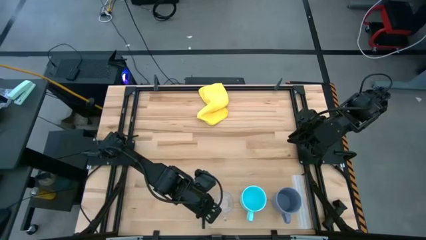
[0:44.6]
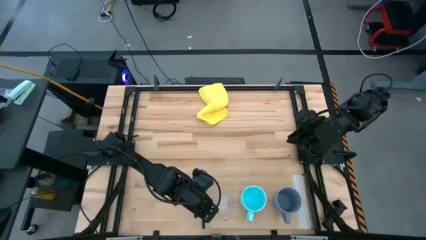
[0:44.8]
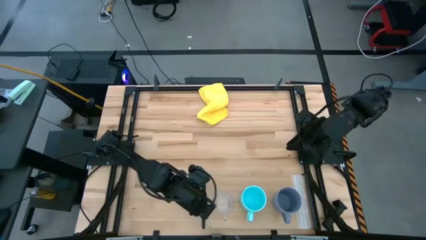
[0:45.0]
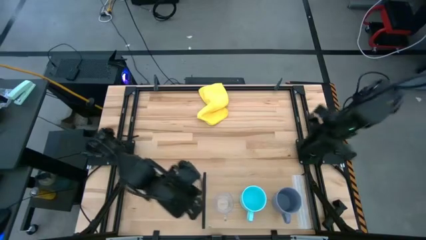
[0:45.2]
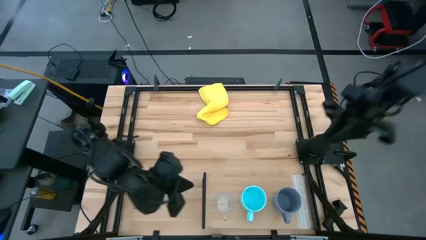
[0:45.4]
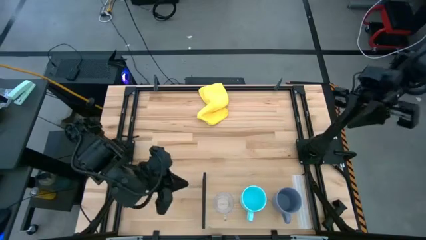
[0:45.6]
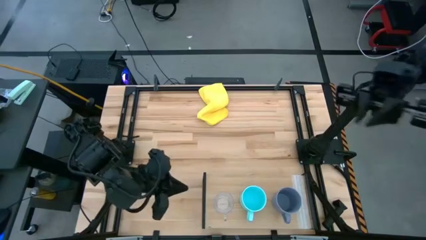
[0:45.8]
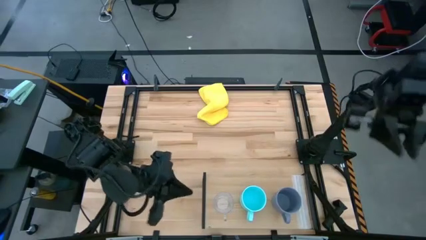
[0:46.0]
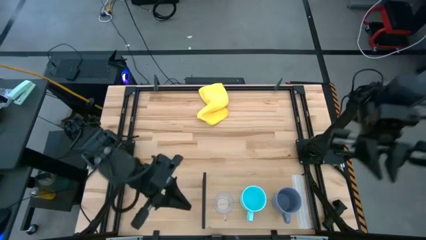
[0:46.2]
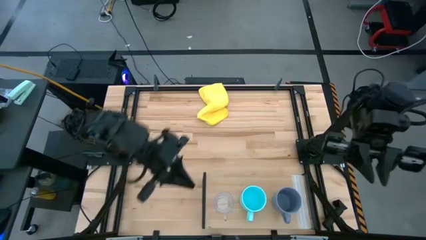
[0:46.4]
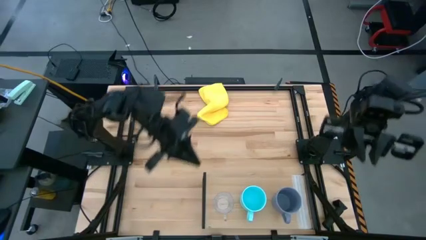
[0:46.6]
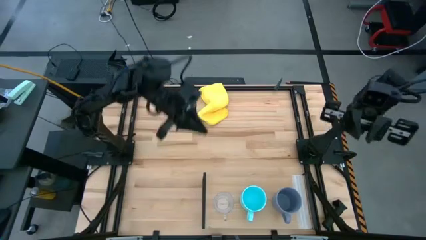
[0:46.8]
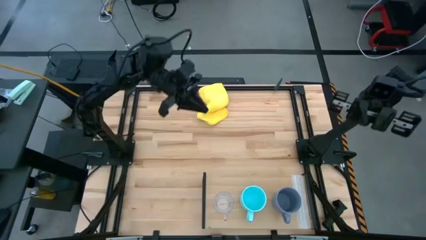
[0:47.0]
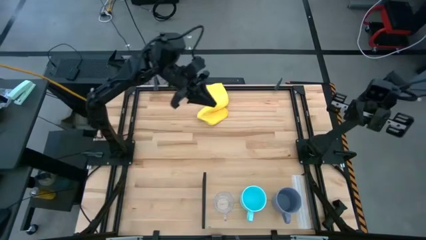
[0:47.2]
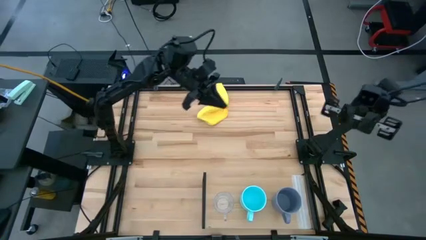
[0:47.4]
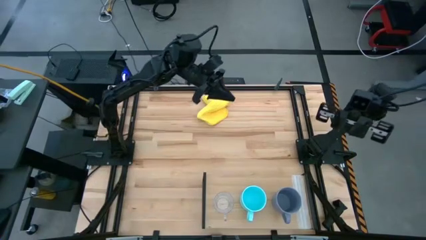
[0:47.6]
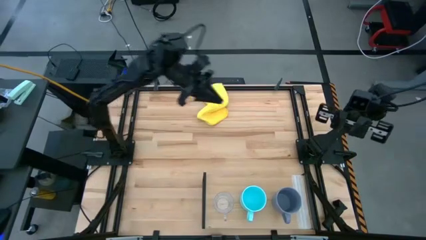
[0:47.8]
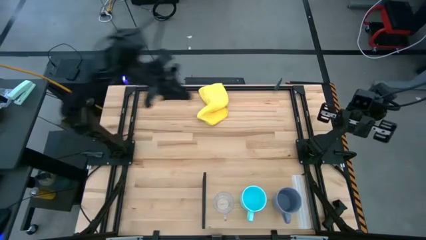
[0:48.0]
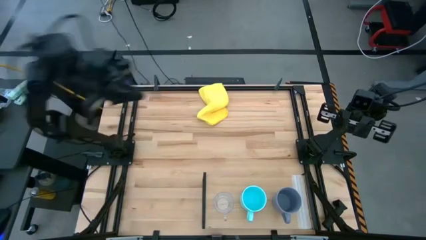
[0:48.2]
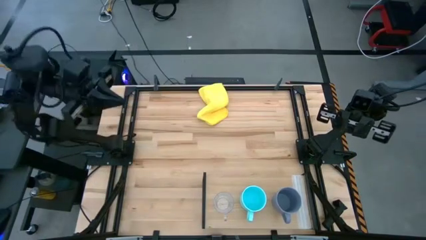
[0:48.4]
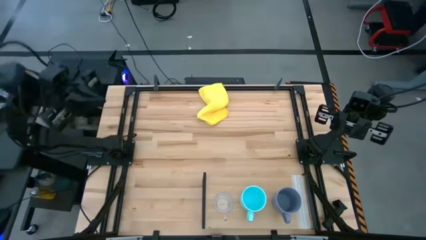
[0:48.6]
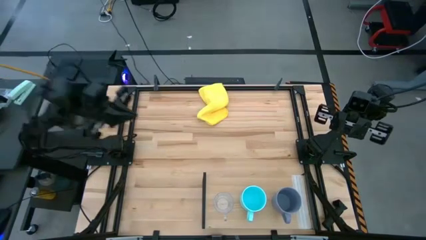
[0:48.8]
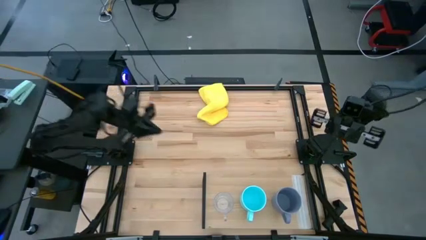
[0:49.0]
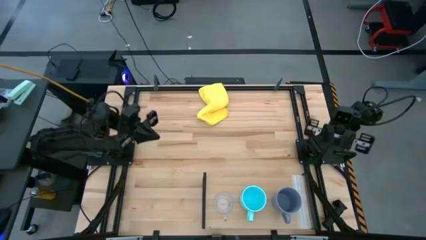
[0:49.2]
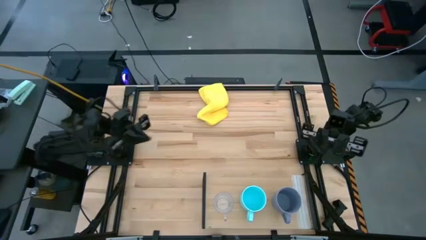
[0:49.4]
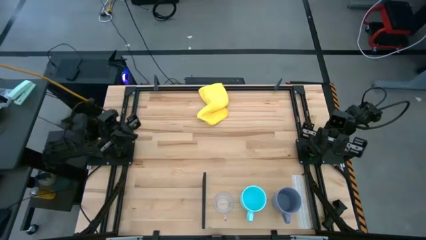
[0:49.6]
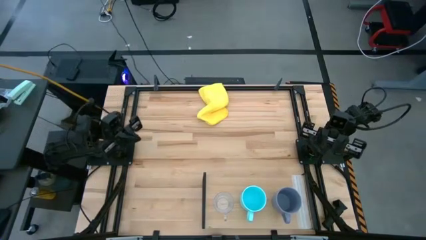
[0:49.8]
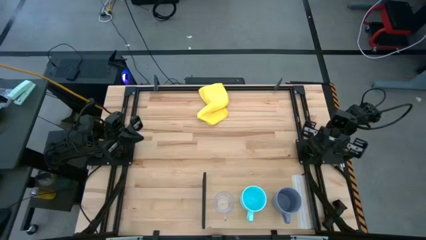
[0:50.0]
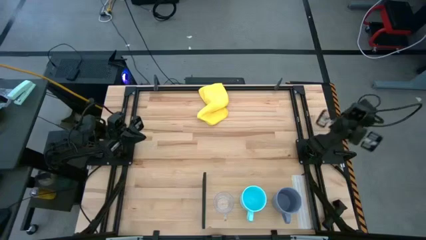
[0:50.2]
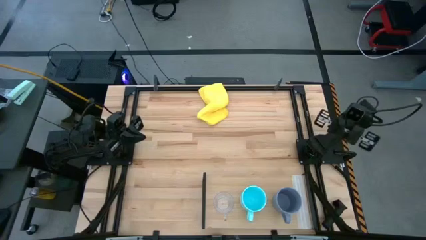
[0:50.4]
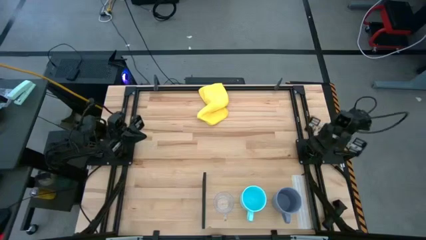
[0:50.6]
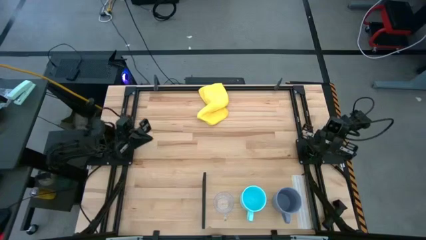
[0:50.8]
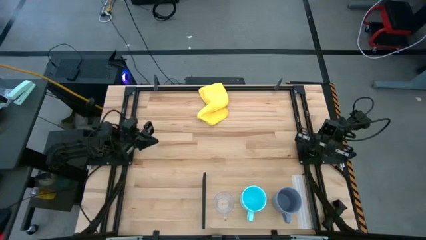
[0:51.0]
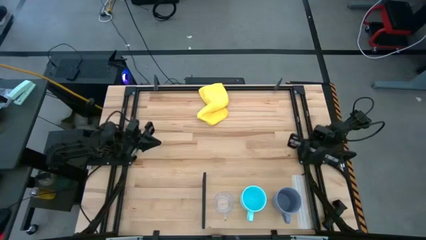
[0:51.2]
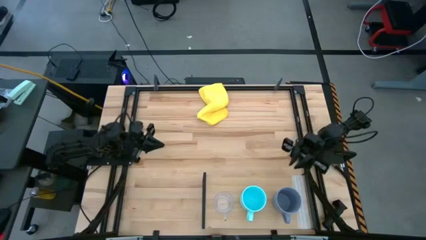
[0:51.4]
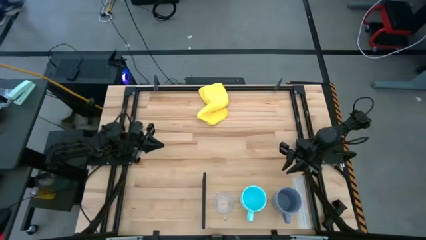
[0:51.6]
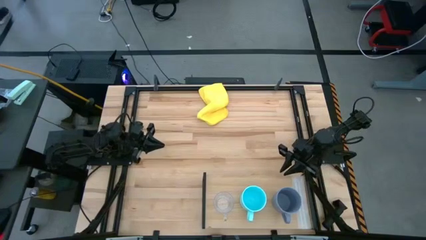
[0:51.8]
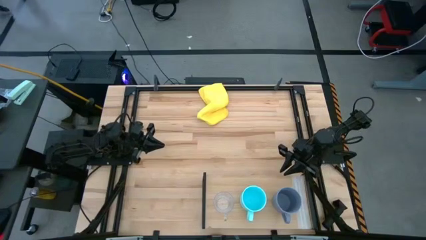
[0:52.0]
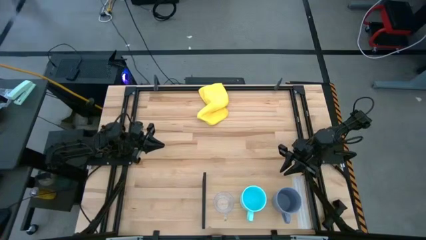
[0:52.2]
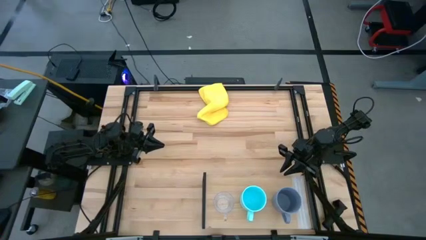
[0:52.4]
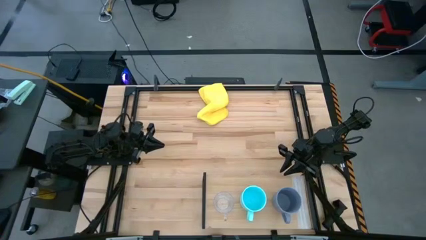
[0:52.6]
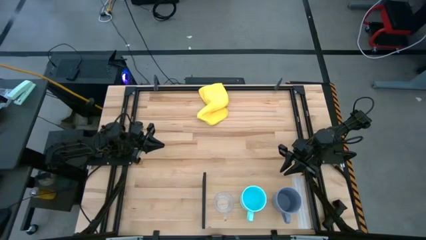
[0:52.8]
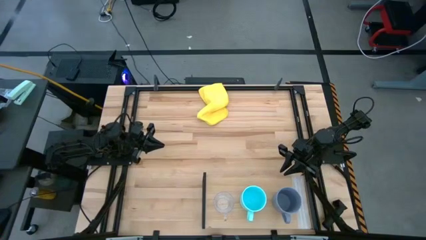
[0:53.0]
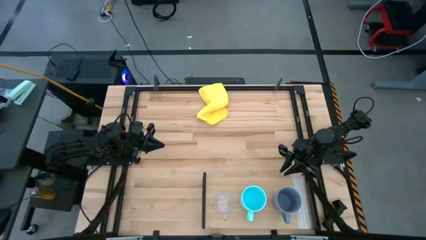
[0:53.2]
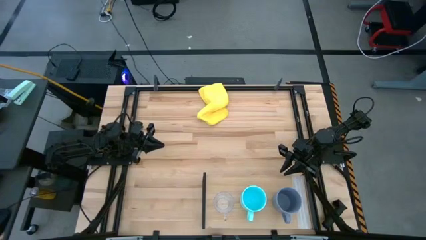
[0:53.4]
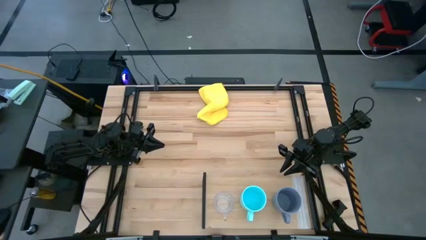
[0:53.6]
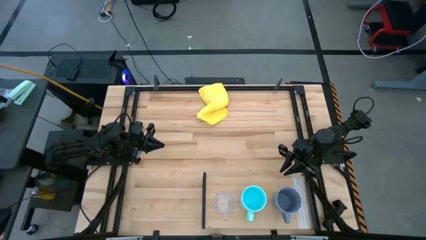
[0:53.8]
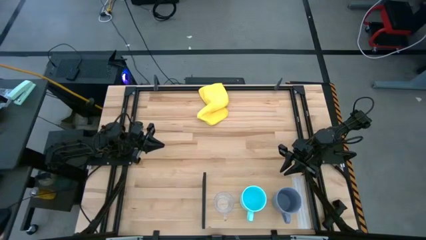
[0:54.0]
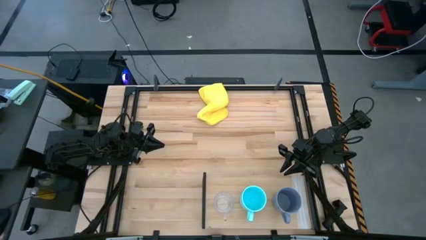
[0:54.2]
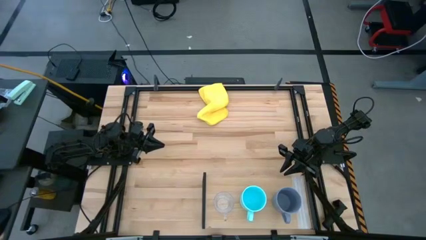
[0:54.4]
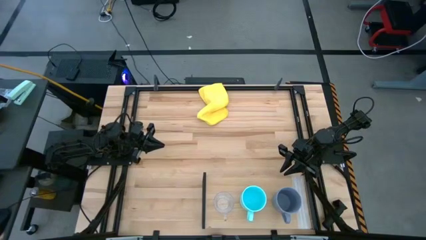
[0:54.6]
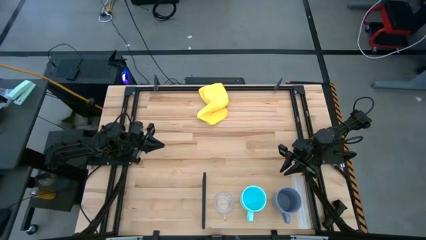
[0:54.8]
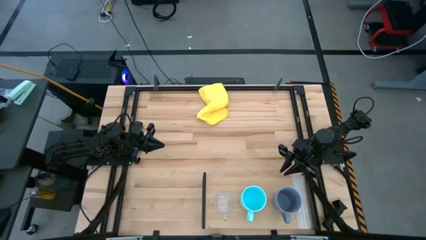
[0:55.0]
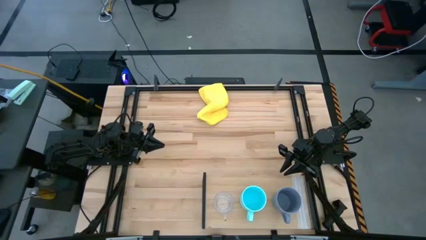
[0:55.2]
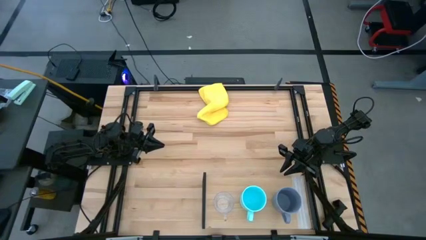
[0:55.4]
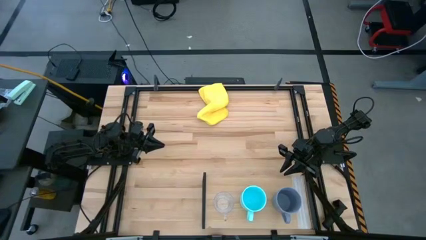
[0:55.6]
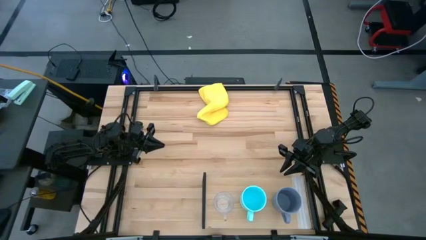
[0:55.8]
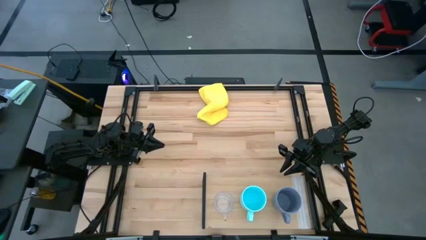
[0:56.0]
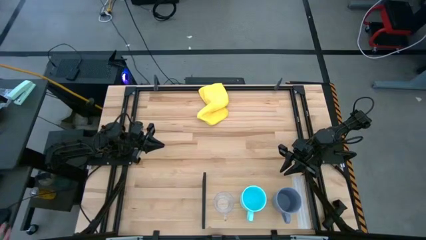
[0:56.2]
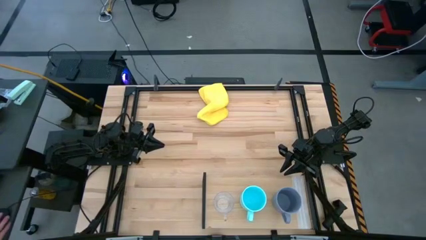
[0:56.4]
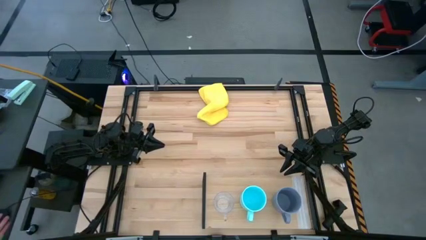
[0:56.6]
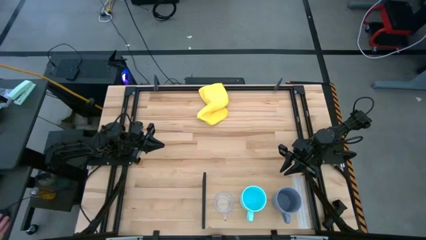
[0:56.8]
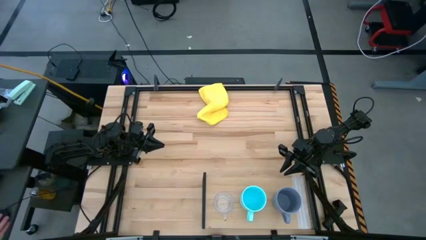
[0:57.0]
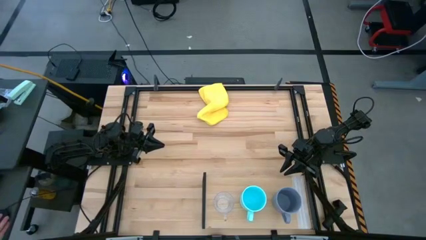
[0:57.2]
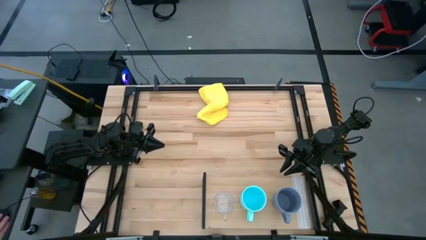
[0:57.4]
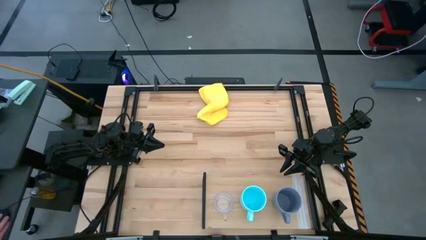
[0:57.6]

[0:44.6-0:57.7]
Task: Stack small to large cups/mugs on shelf
Return to Home Position

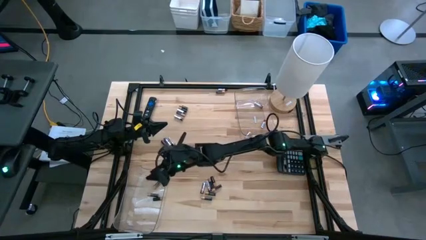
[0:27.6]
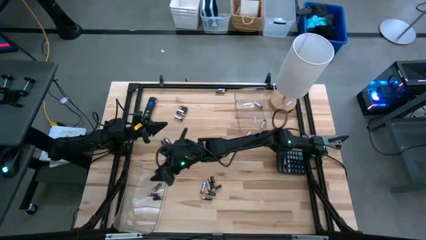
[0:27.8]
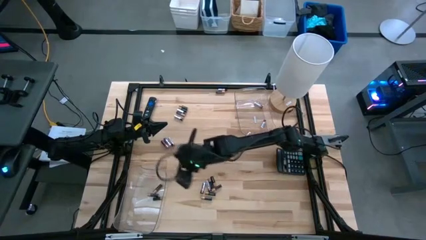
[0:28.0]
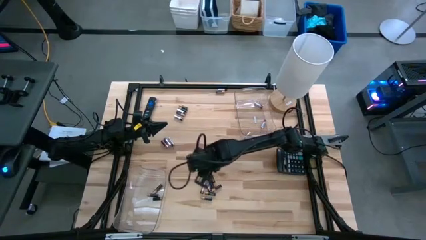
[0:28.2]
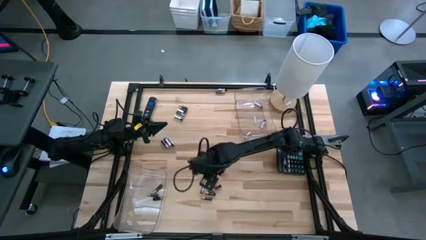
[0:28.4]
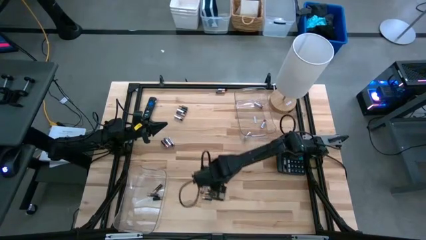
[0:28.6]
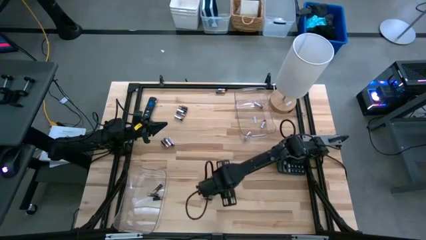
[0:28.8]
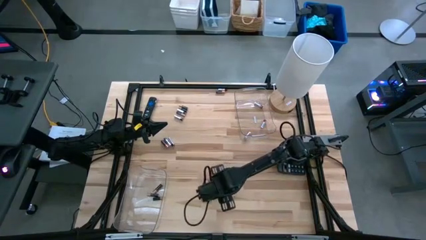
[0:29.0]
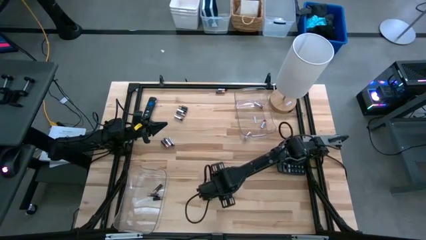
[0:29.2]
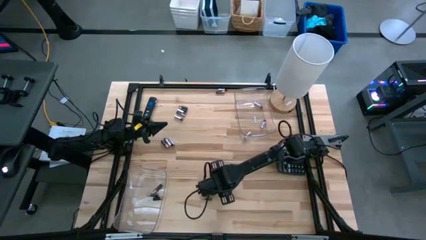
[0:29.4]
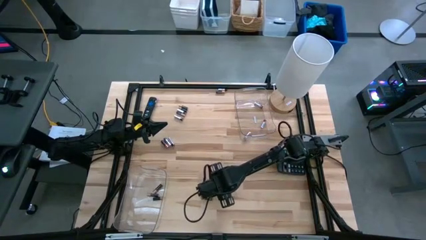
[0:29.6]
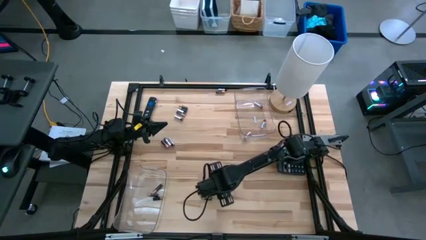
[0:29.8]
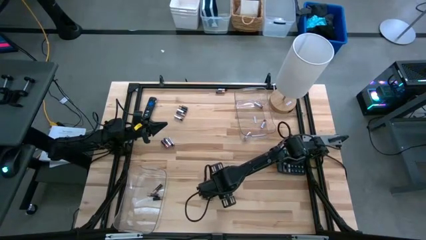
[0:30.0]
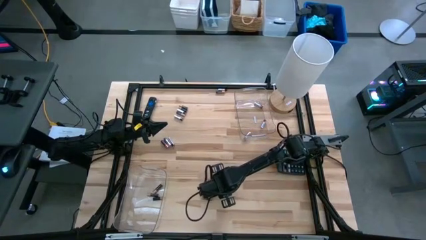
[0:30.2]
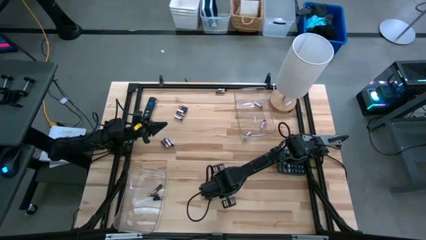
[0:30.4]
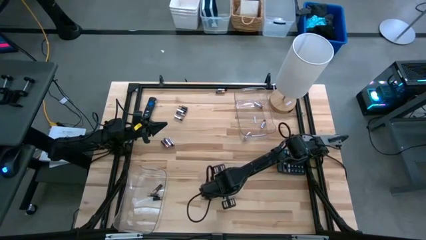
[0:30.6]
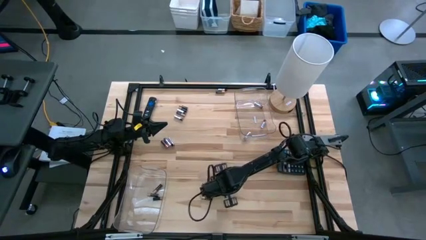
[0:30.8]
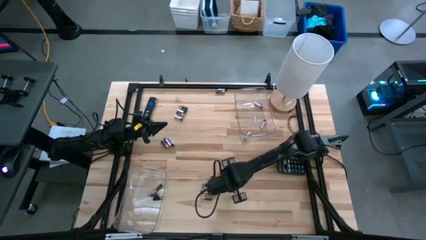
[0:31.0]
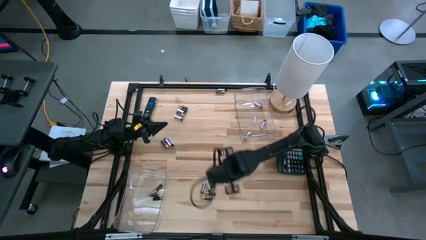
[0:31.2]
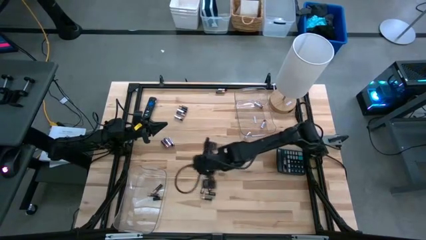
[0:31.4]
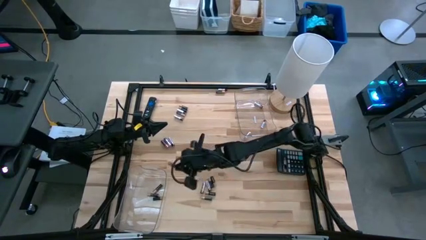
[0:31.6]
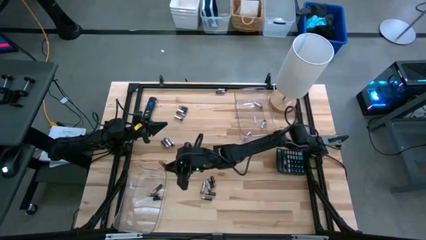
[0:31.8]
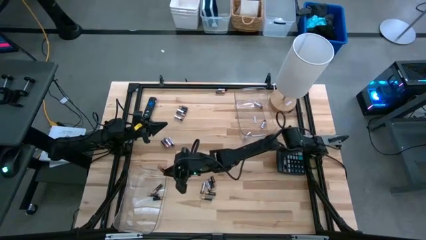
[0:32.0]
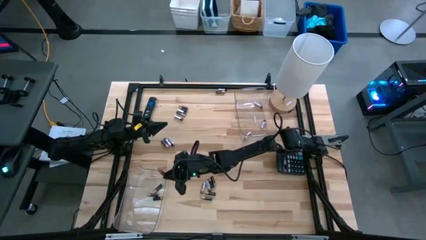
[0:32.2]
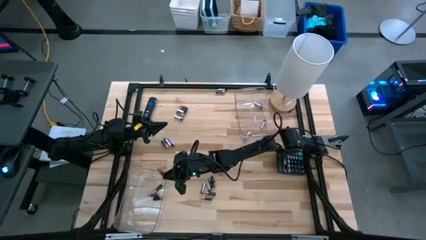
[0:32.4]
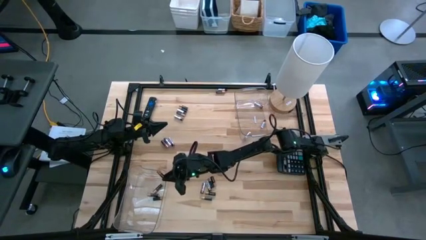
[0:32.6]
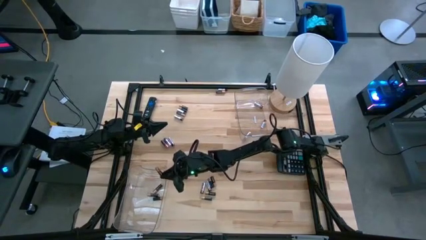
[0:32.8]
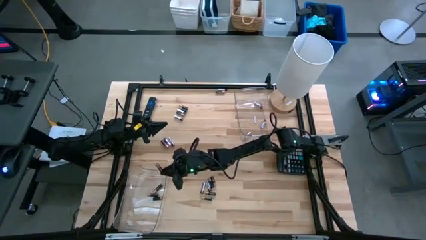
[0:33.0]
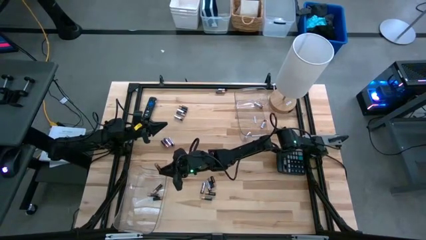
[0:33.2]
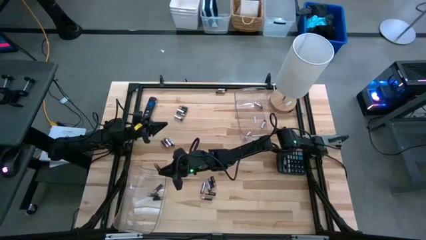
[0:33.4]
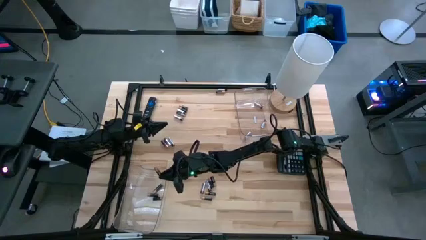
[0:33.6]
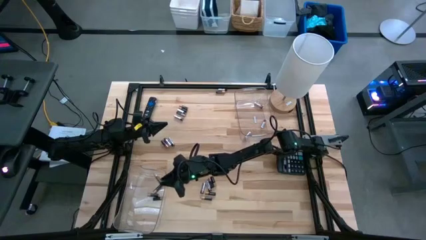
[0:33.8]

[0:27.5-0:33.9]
Task: Sort batteries
Put the brown battery into the left transparent bin
